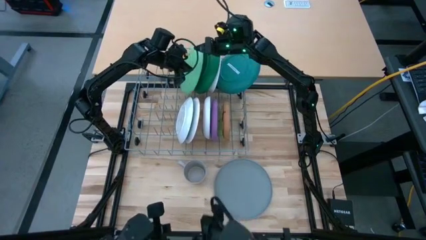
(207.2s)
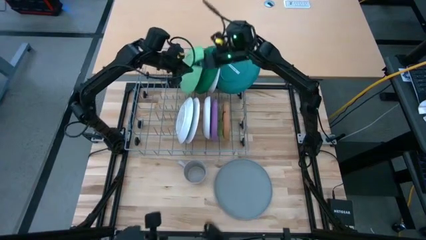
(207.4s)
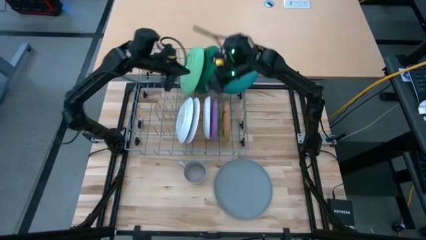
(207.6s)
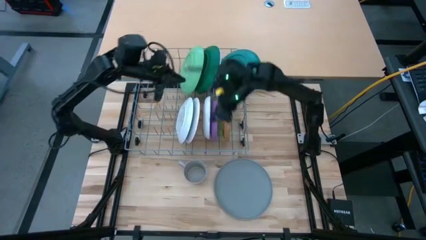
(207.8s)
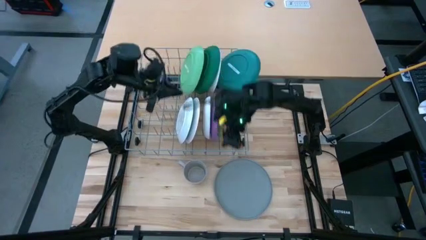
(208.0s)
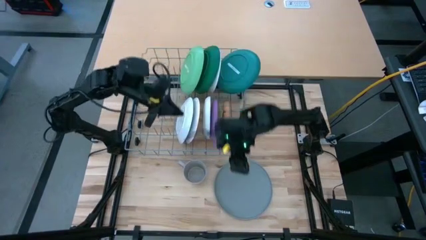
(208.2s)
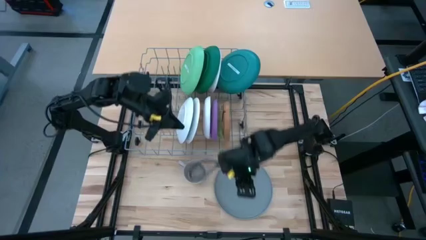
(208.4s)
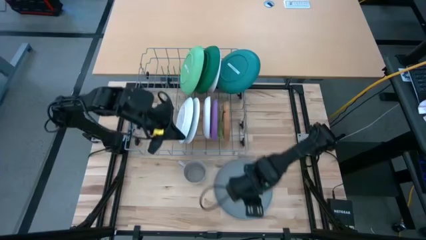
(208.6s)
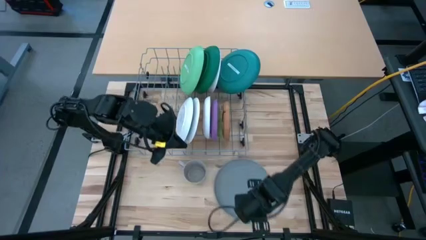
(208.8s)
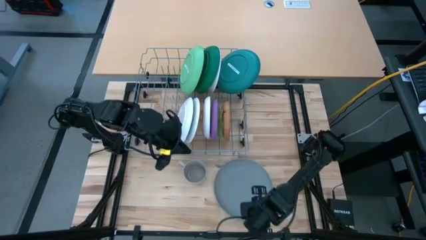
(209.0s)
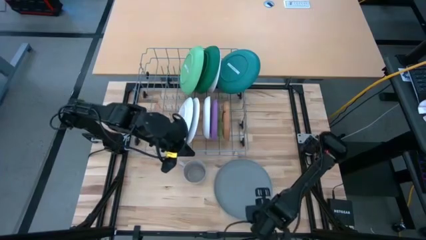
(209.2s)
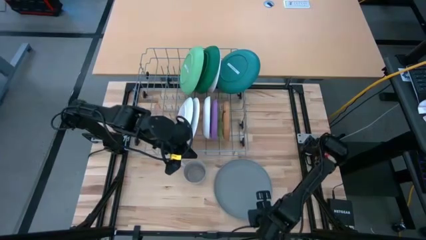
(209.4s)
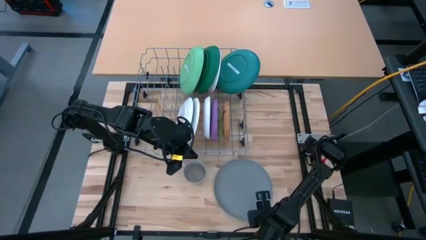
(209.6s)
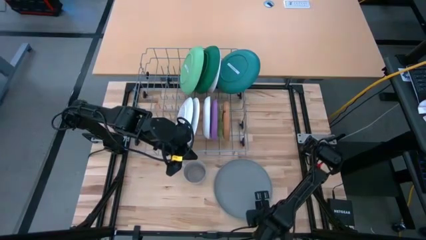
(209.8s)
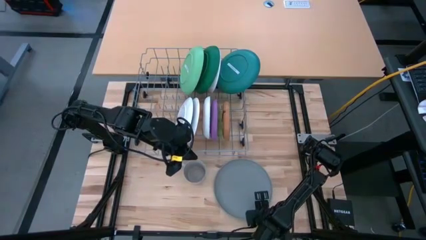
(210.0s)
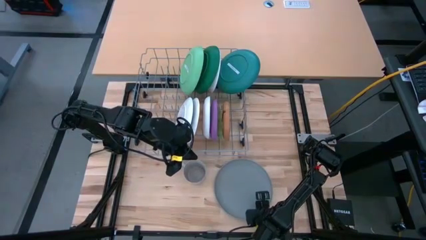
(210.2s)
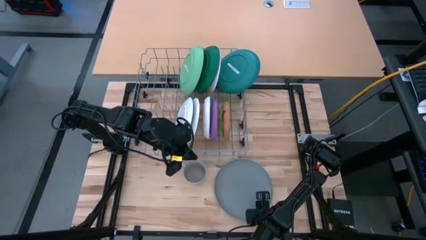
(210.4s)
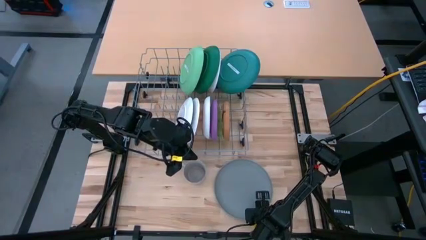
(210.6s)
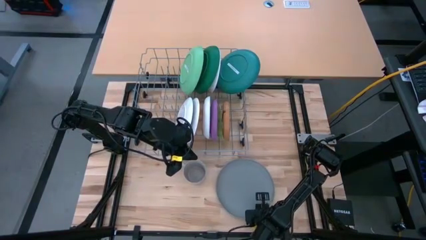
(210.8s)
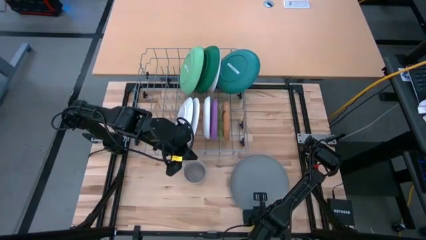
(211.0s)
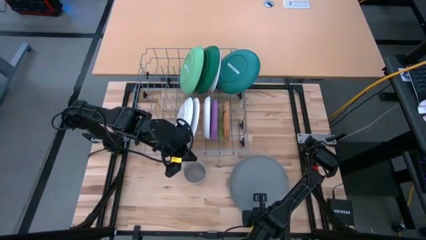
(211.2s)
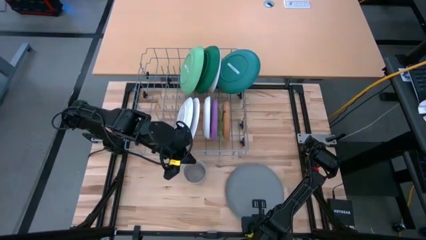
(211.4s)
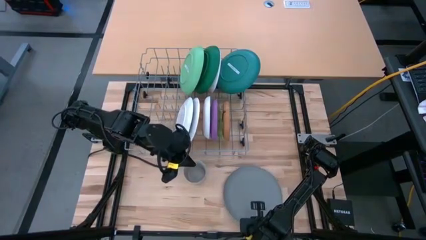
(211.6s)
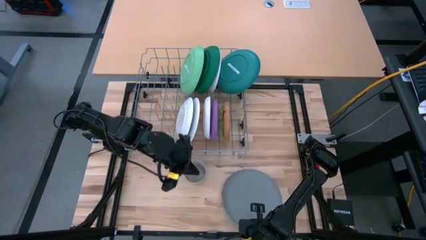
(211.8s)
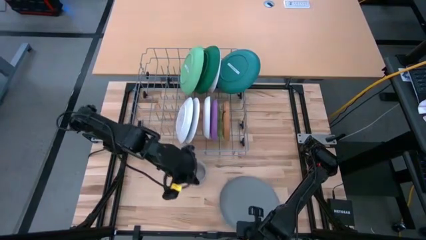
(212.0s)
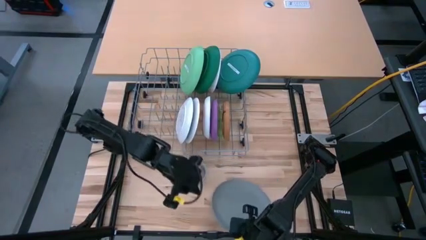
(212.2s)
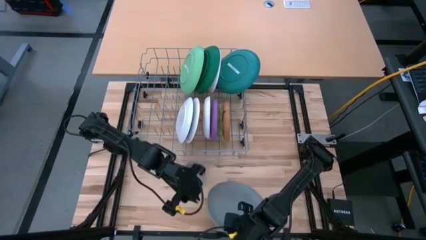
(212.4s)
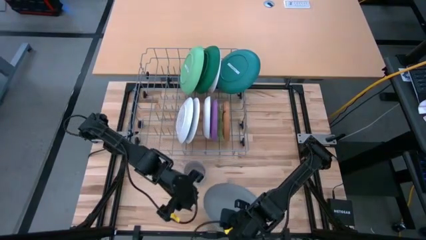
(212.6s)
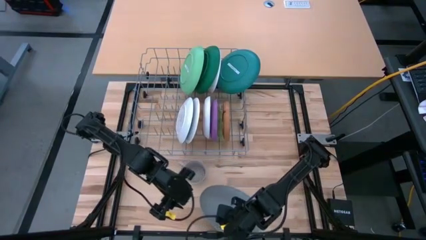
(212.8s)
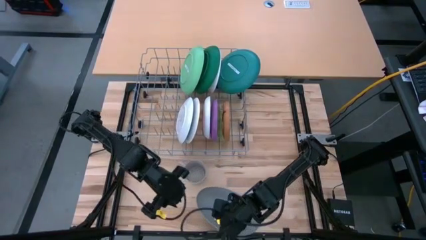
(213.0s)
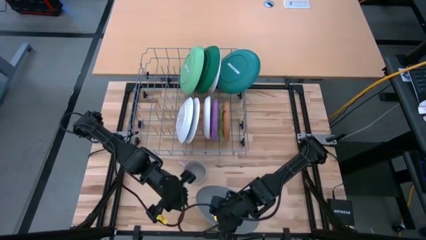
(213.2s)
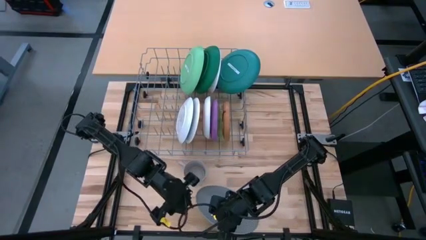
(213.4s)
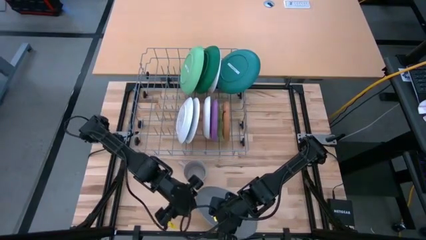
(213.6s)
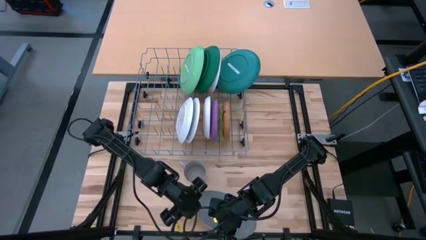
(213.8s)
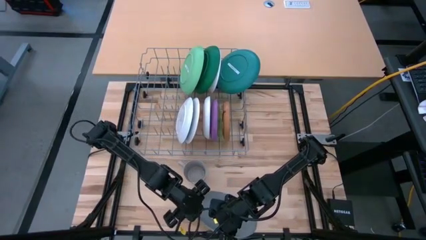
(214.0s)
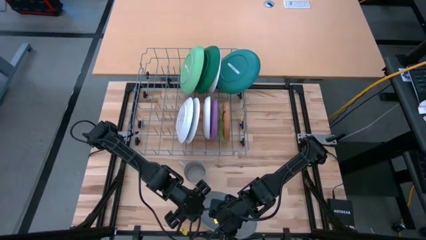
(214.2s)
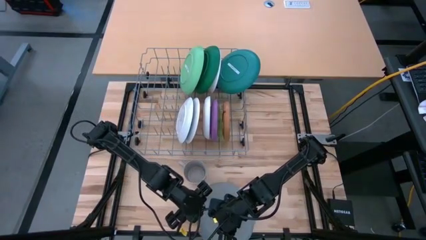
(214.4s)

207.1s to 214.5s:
Task: Sort dishes
Put the gray plate in the dish rack

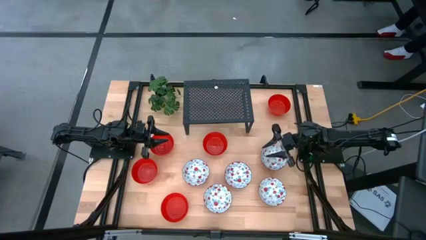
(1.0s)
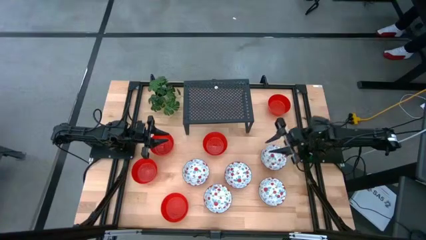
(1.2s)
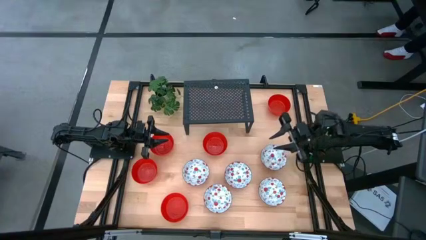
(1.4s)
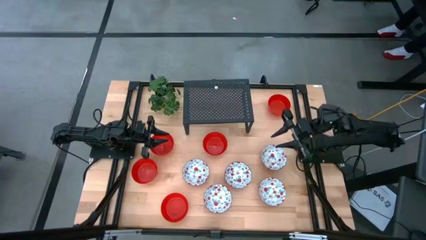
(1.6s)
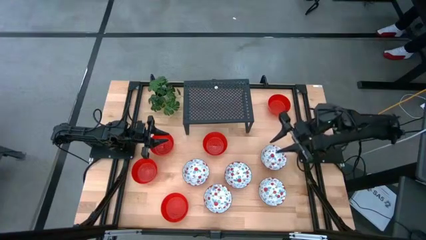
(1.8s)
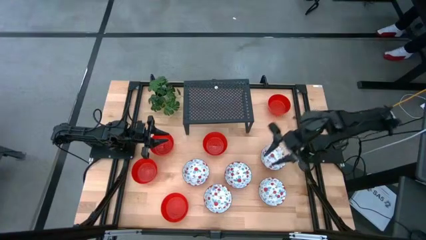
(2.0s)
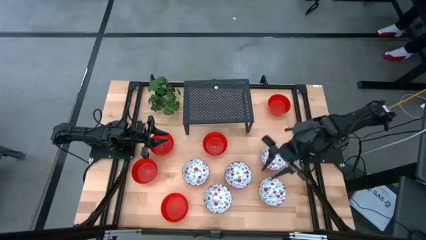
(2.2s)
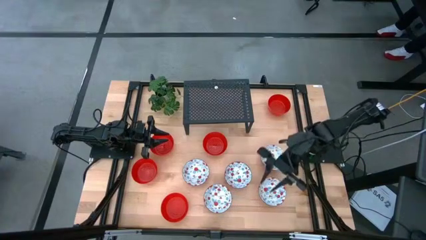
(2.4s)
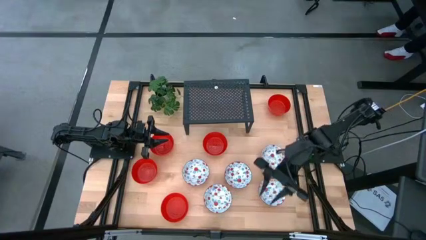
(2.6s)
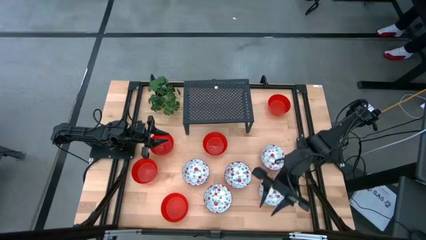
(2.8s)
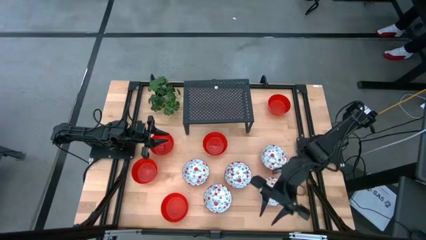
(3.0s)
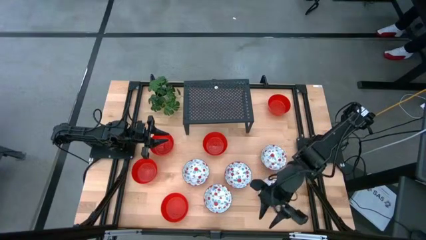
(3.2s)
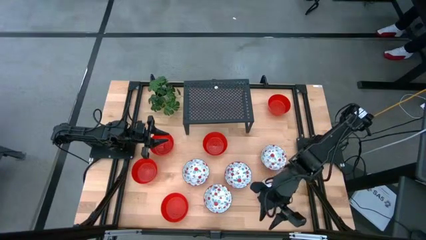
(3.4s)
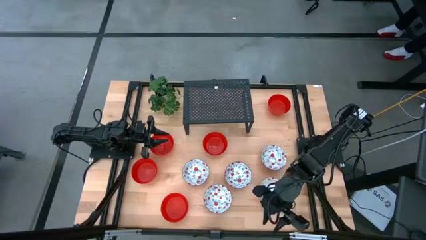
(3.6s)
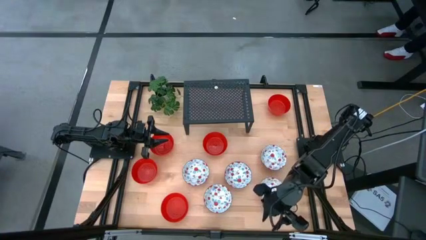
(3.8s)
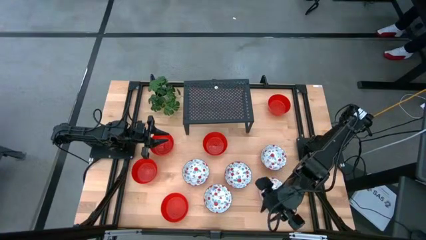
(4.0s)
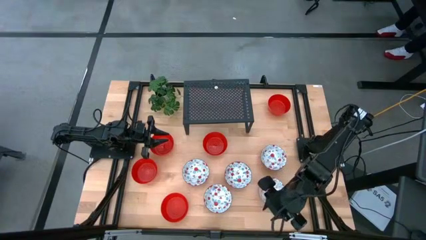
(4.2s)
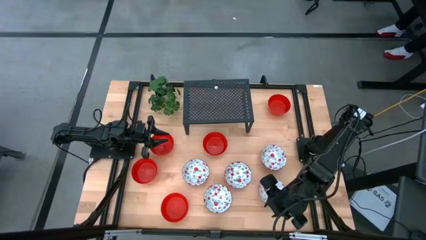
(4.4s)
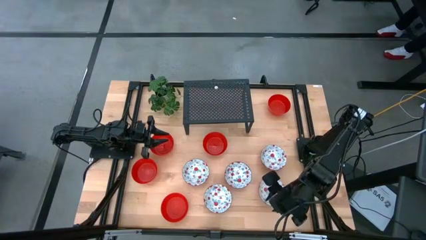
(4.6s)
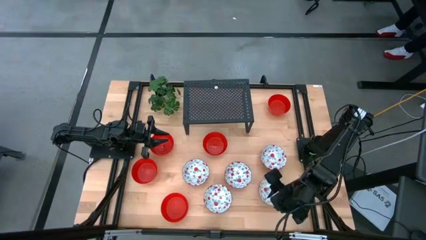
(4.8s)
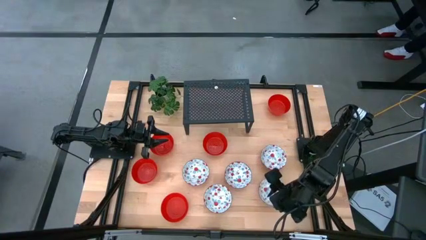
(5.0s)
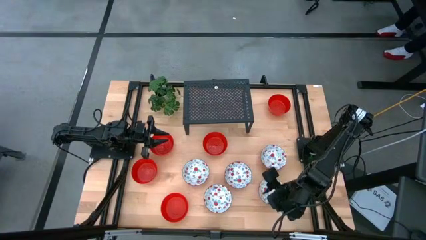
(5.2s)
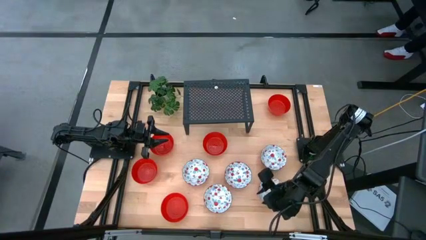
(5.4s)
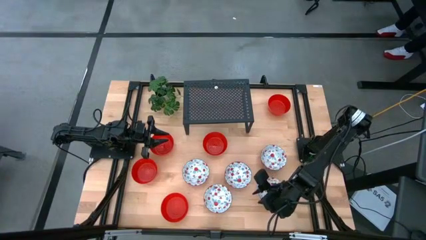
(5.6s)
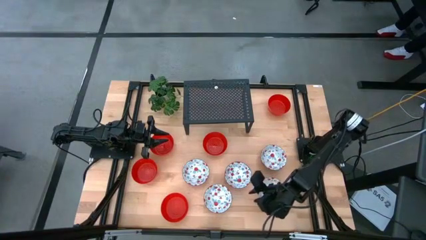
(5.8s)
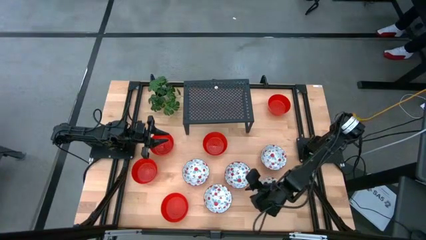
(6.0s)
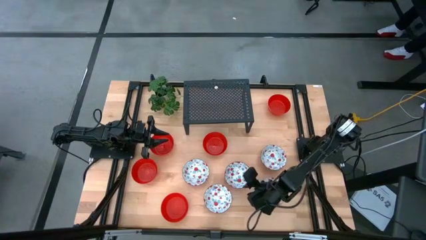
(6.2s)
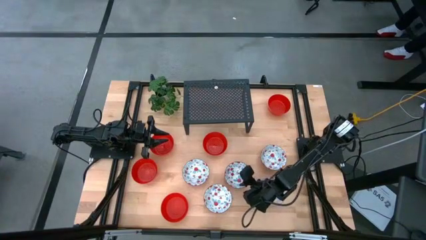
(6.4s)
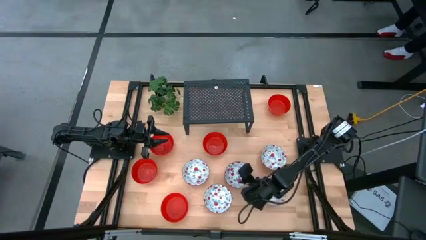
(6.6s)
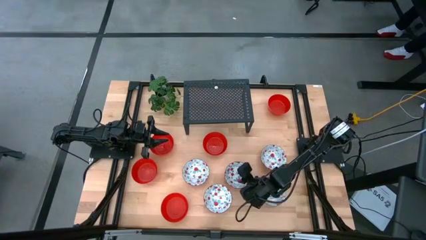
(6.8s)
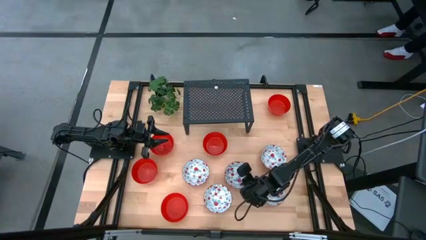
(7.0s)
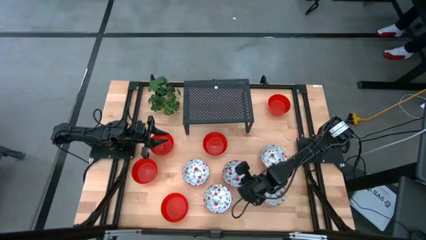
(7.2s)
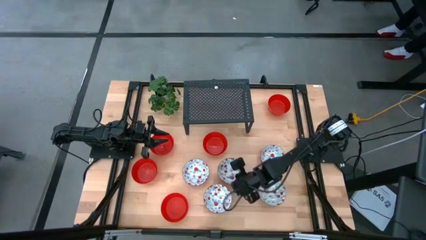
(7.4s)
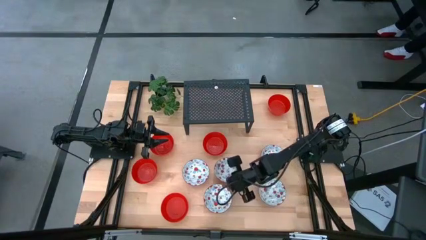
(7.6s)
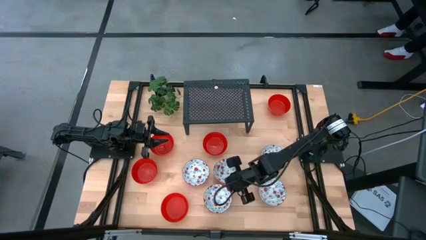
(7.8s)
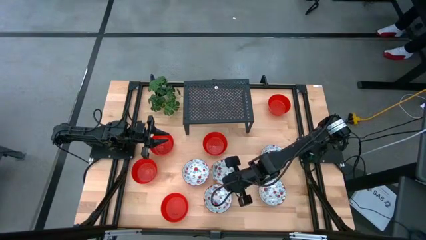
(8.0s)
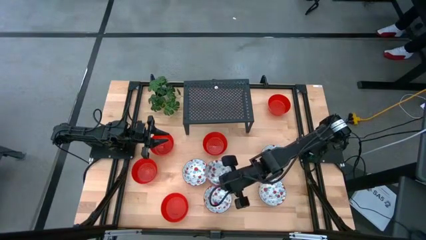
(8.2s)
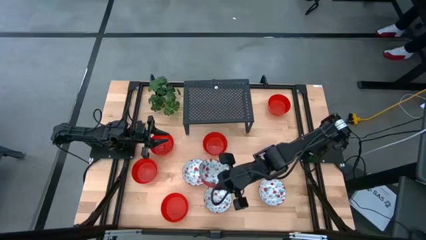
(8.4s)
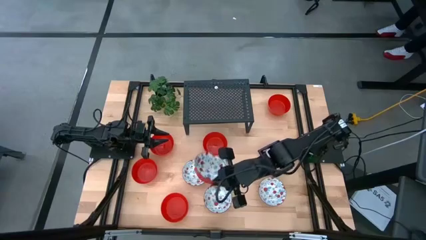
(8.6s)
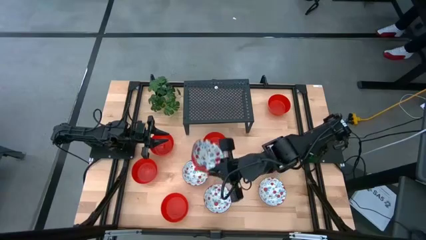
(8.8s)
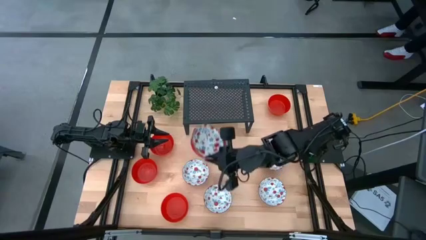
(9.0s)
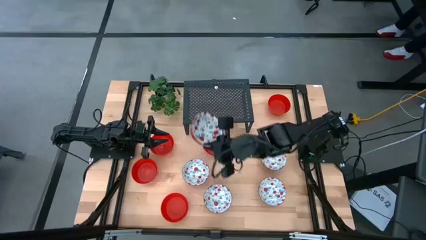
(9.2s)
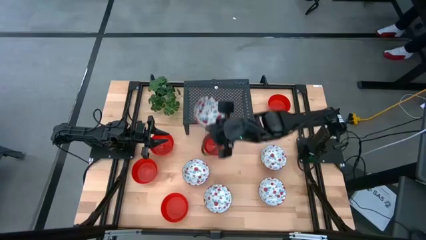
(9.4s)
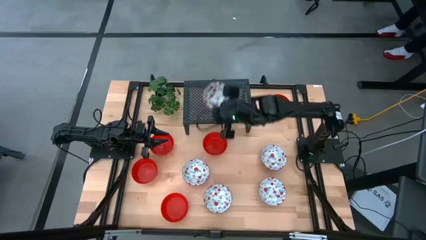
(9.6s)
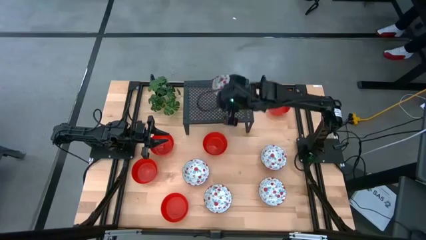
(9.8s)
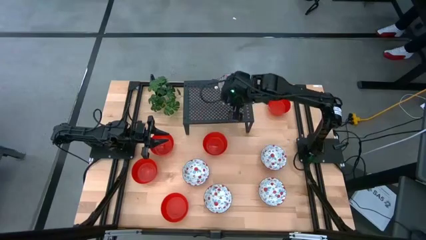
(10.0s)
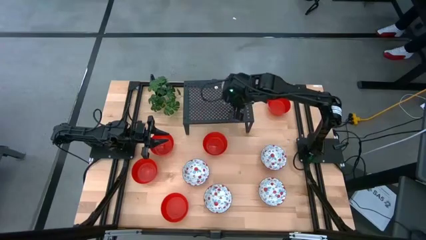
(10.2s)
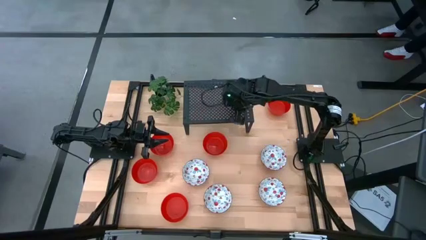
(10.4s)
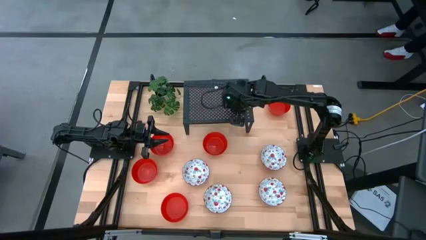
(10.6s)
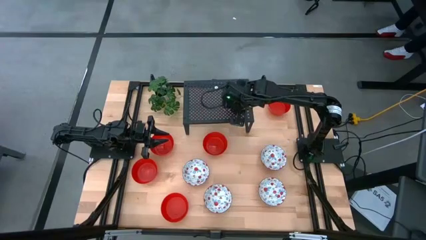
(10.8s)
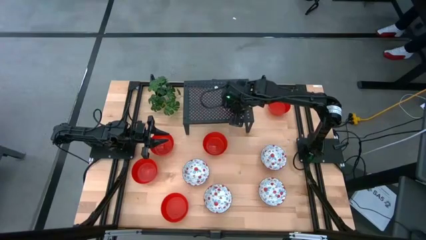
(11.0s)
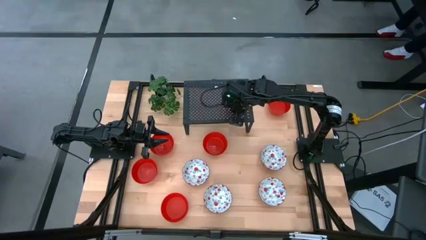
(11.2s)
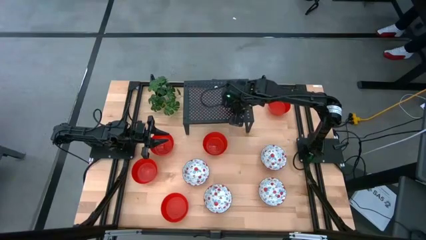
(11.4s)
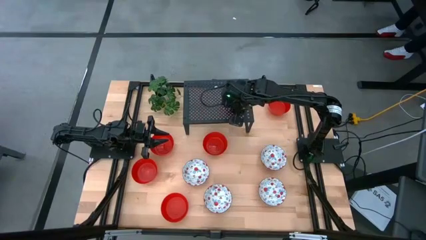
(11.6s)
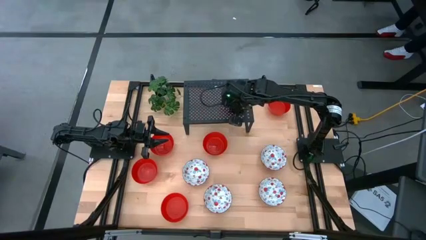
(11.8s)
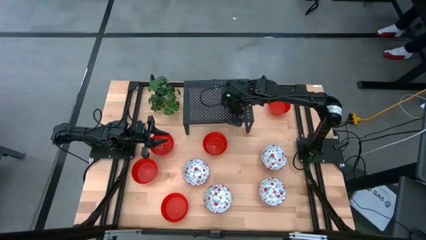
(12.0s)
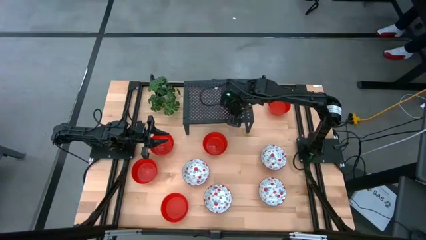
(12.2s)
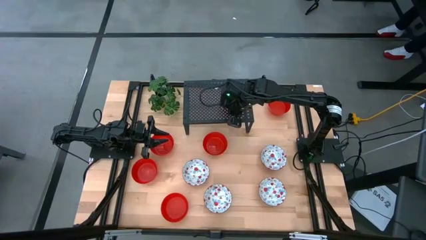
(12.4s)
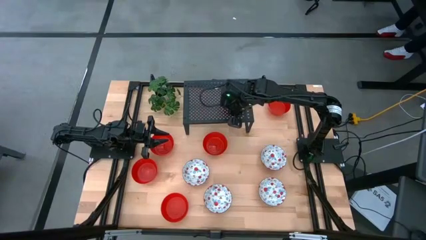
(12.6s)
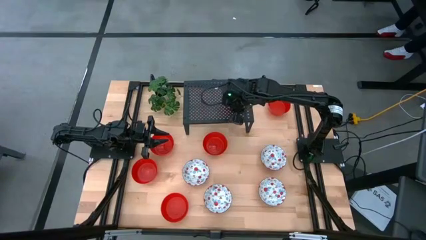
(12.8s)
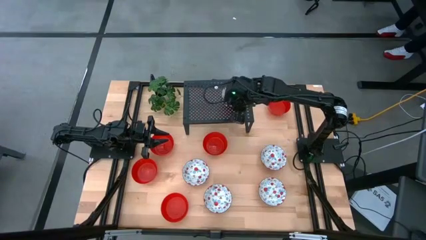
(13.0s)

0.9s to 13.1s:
Task: Pick & Place Mini bowls
Put the white bowl on the shelf
